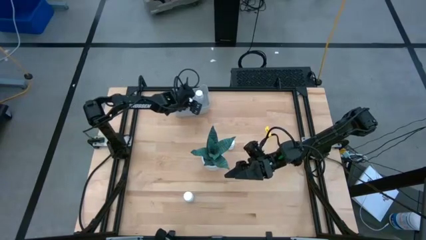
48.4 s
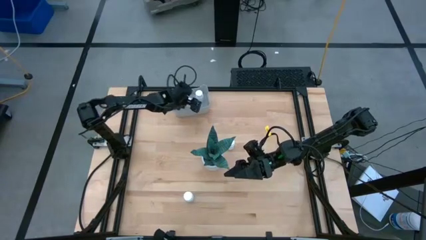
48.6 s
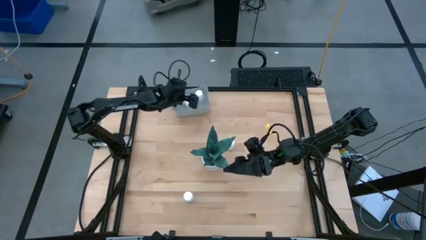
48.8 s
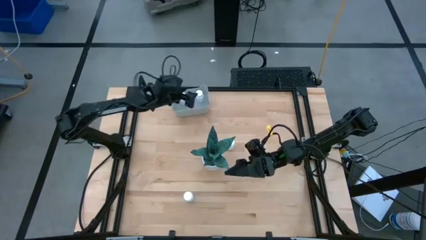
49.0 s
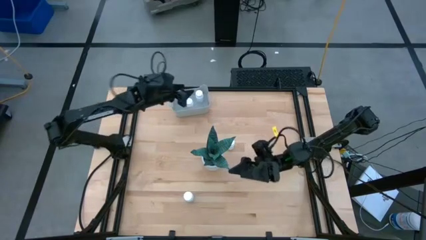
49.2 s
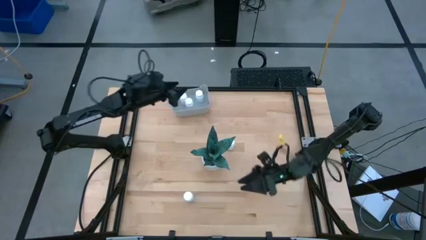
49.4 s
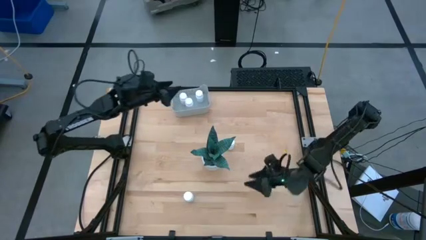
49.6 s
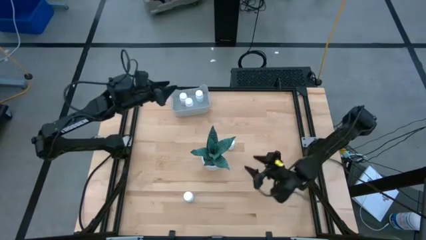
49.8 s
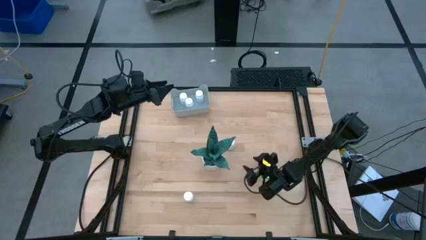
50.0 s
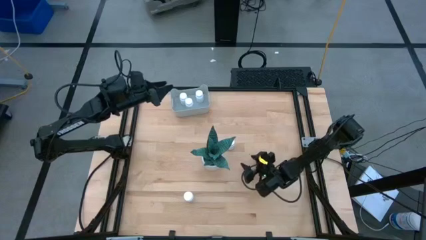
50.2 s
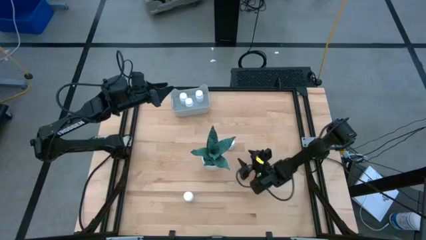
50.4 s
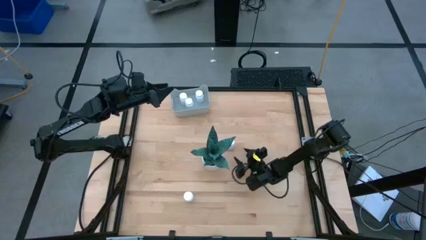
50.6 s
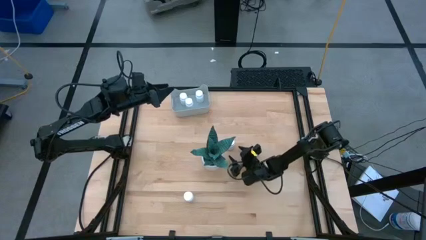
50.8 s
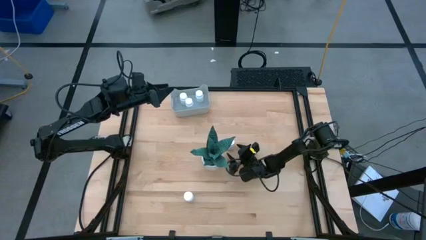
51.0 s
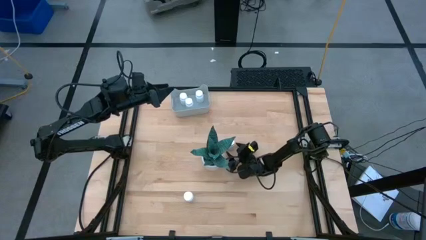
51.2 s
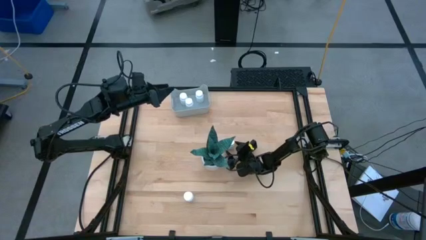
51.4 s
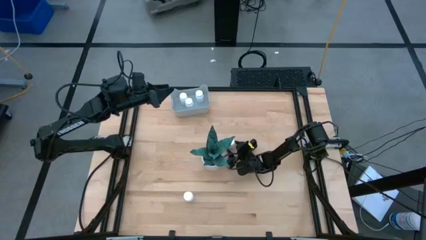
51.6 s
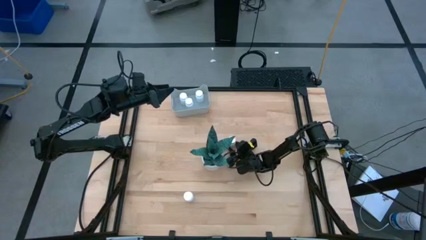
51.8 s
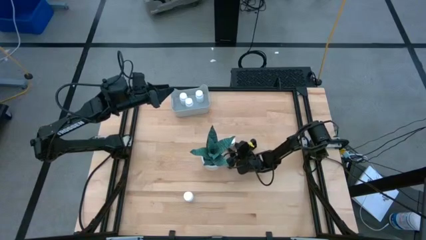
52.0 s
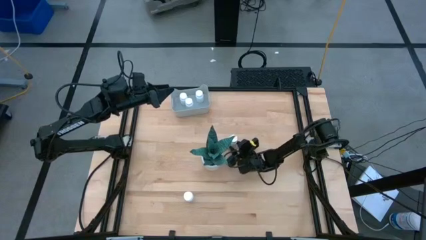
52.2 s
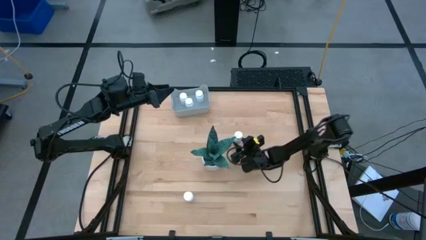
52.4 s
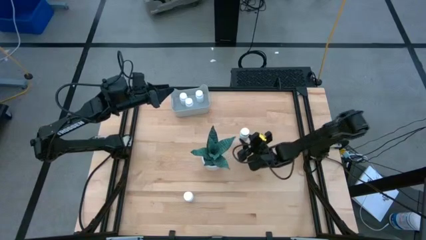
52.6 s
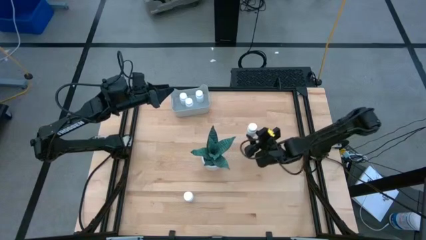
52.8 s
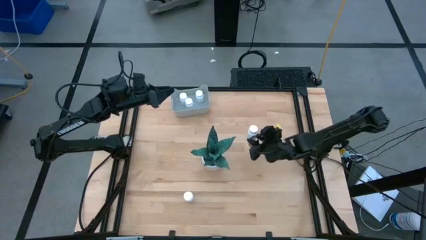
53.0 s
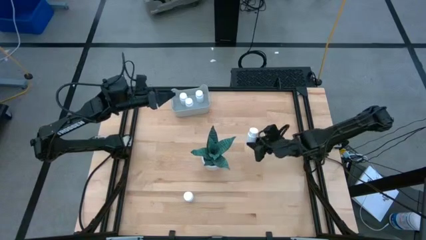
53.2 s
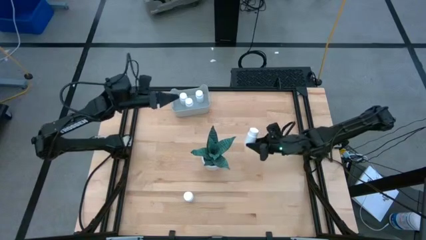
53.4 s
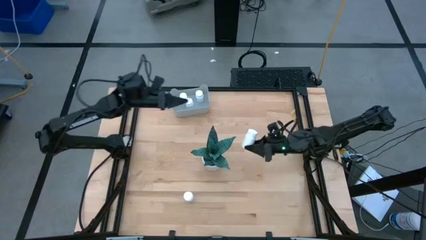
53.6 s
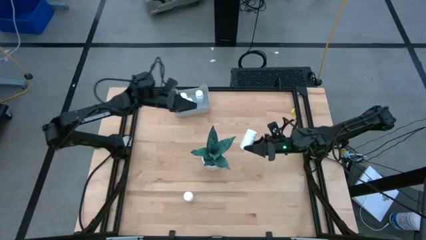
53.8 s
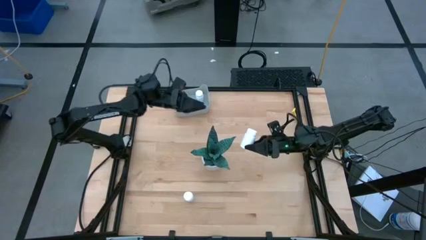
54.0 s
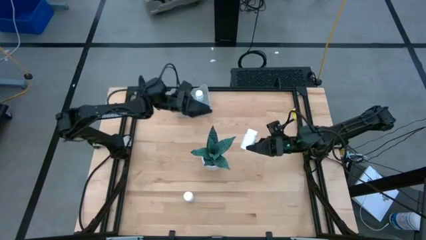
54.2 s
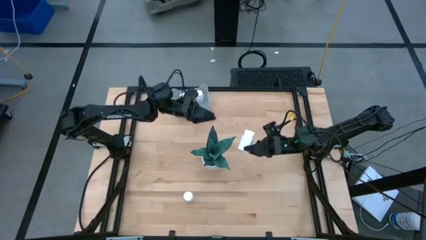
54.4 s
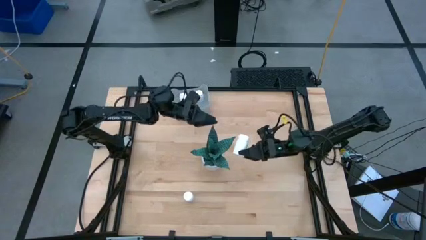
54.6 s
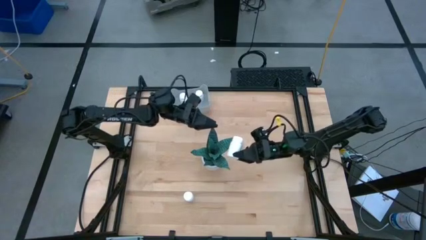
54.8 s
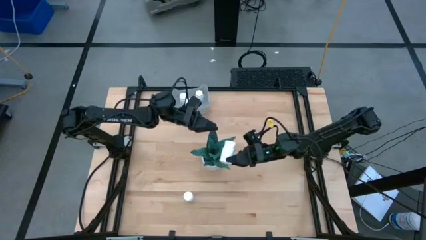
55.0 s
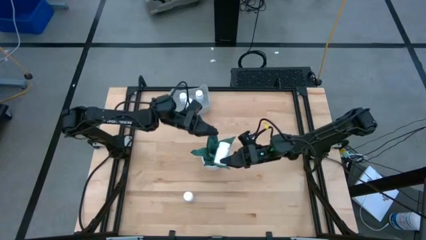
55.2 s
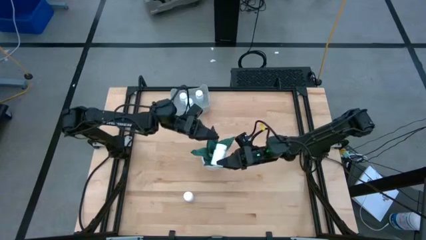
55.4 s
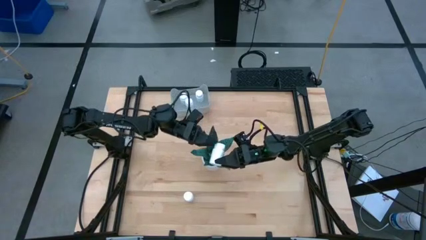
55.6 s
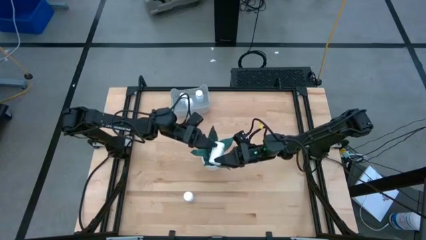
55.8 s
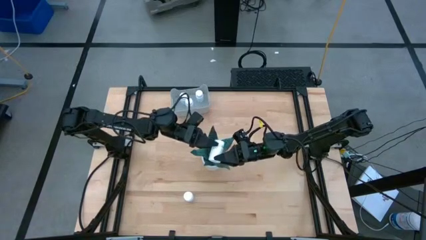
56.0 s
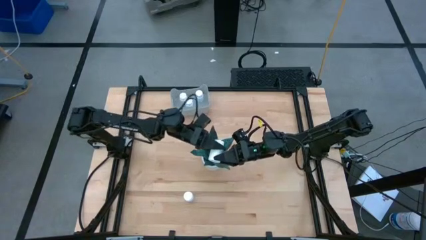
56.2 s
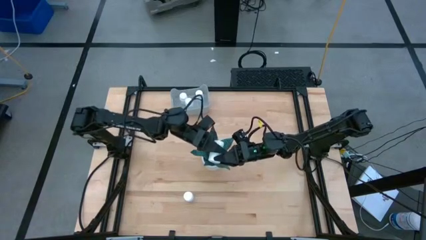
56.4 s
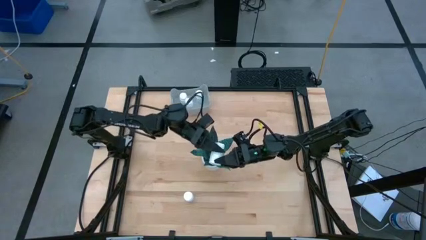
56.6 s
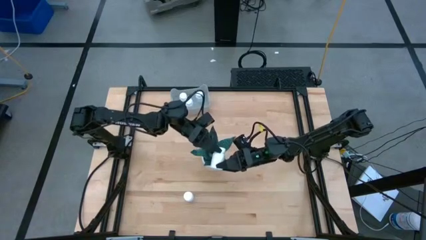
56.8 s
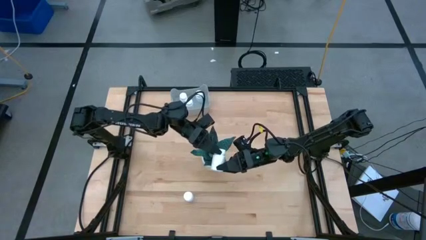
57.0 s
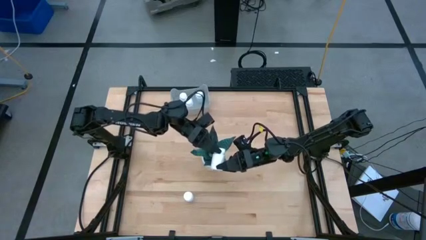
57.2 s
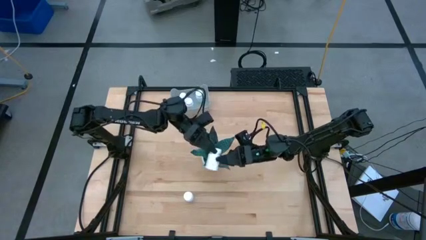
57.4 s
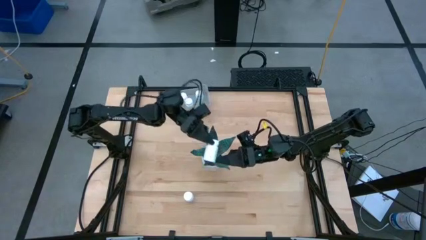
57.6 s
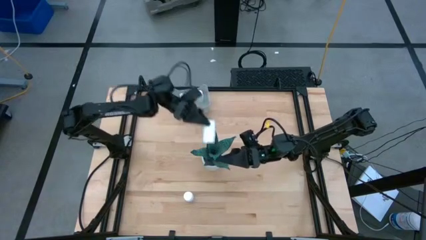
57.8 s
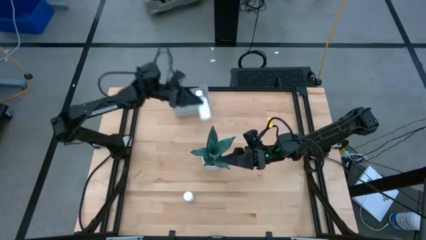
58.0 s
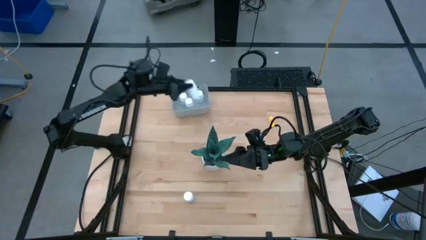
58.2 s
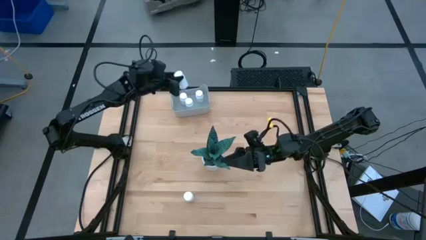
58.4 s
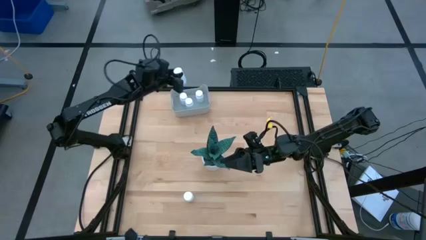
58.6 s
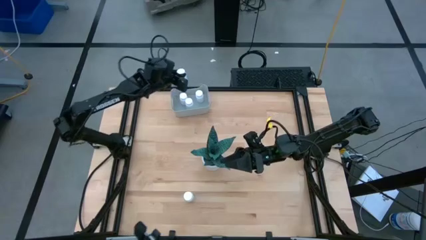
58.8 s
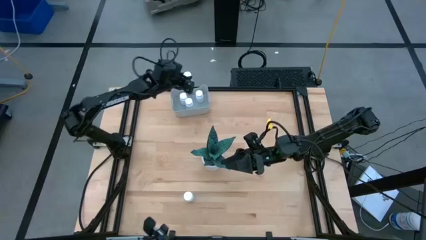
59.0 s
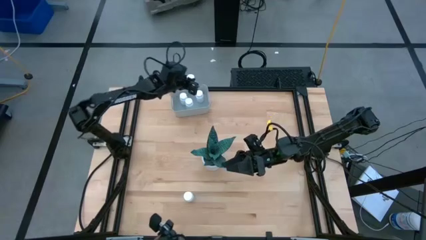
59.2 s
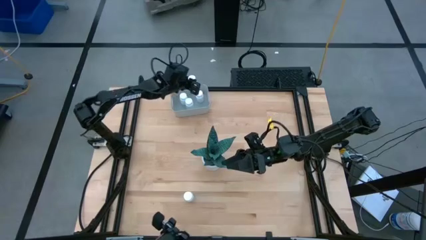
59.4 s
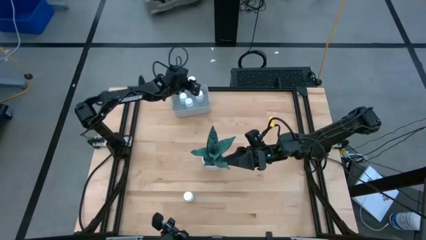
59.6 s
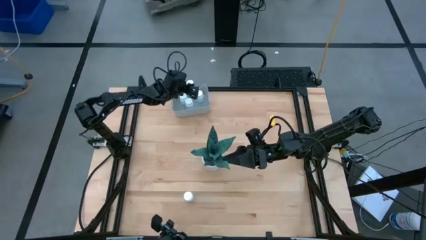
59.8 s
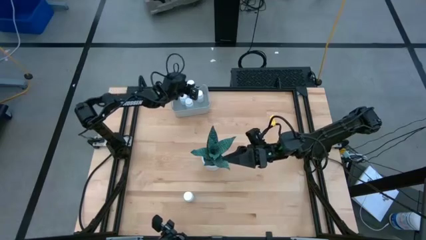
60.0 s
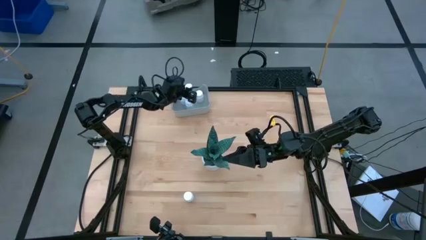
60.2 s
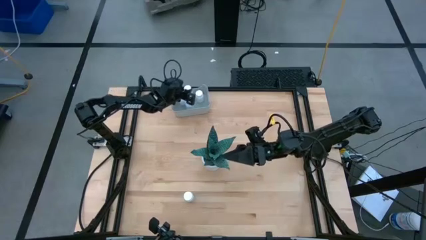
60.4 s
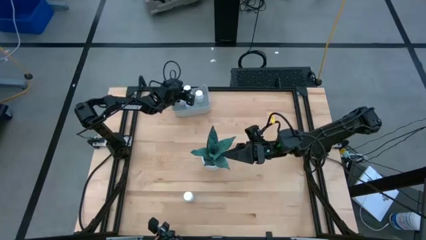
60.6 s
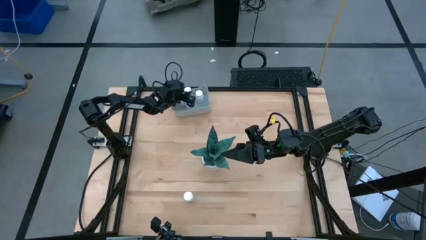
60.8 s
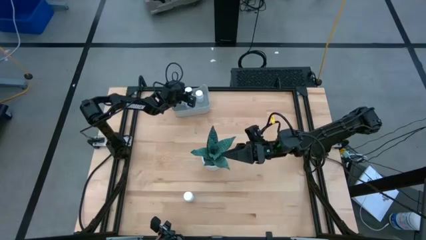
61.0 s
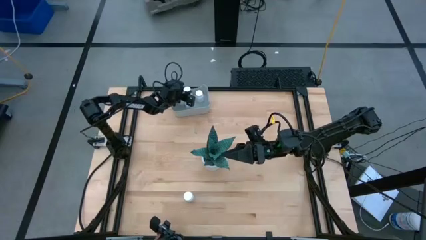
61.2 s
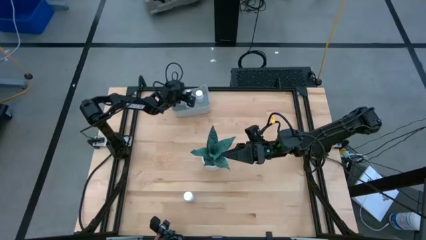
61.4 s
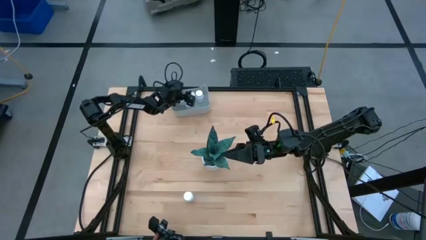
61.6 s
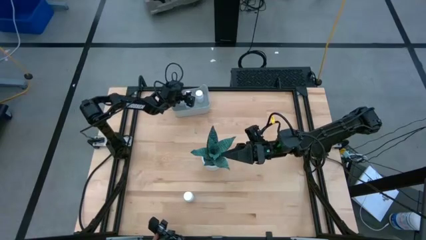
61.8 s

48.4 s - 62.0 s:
Task: Pick and place pill bottles into a basket
Put the white medicine bottle into the gray bin

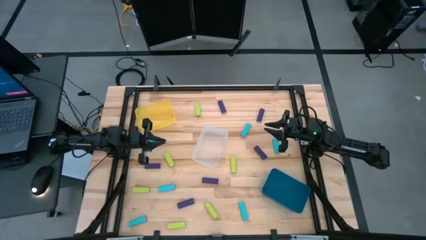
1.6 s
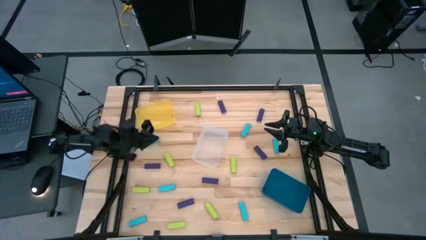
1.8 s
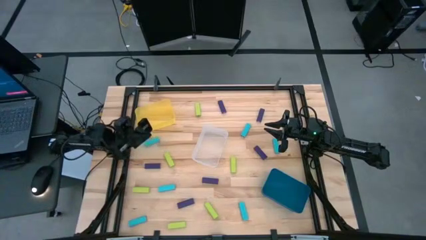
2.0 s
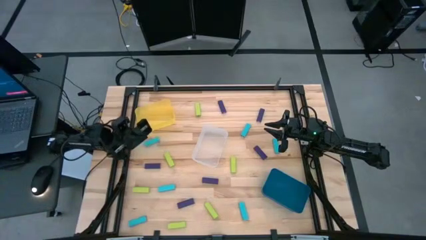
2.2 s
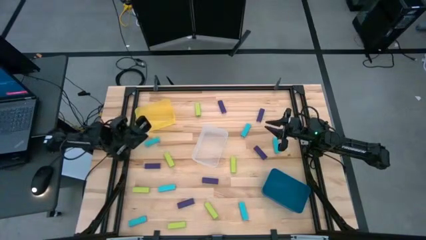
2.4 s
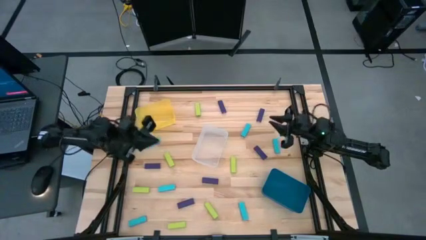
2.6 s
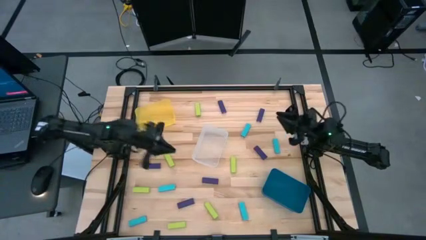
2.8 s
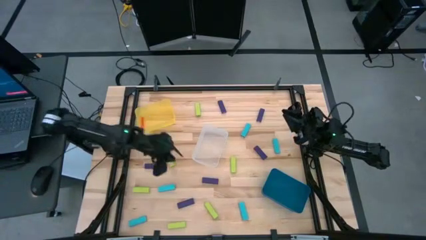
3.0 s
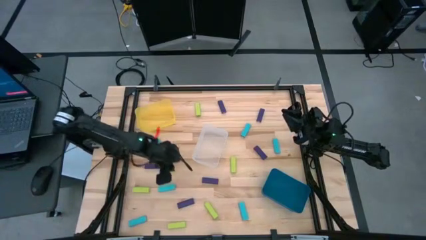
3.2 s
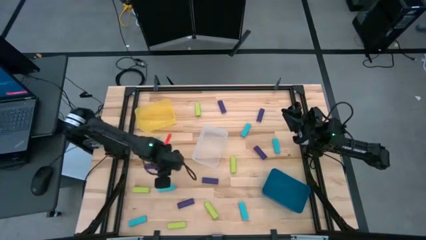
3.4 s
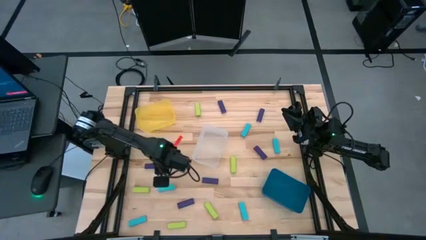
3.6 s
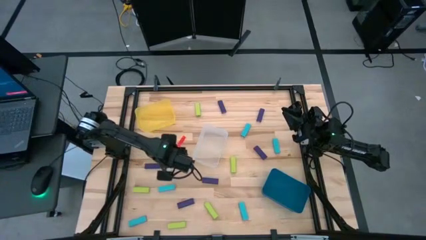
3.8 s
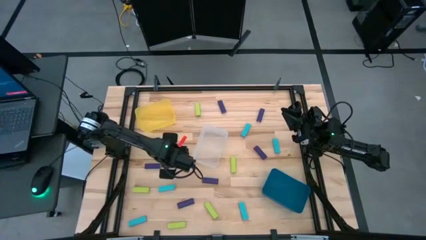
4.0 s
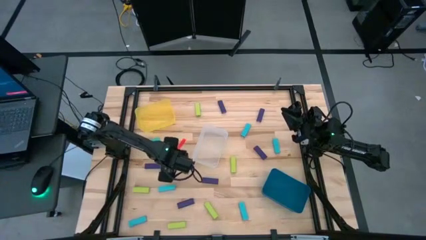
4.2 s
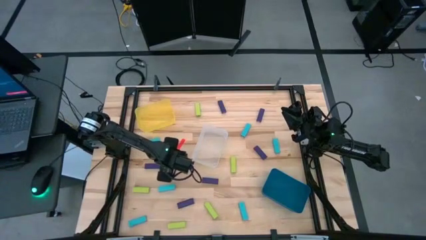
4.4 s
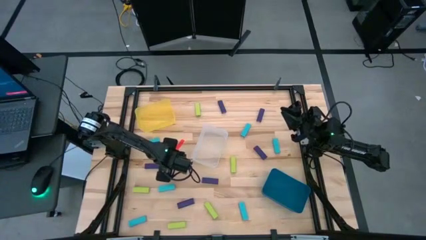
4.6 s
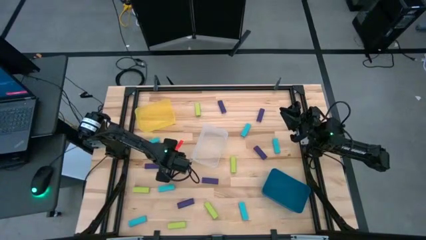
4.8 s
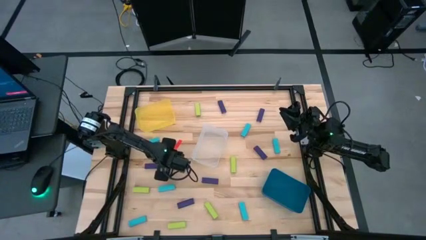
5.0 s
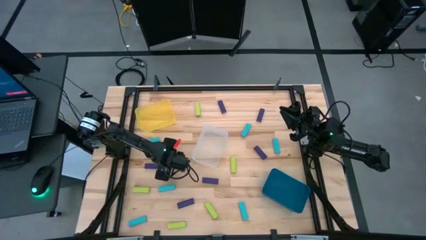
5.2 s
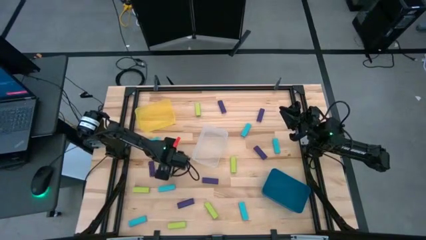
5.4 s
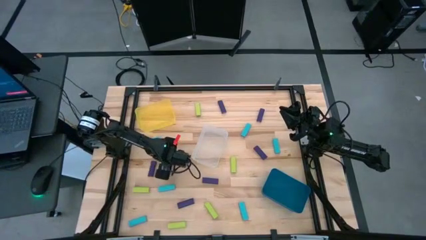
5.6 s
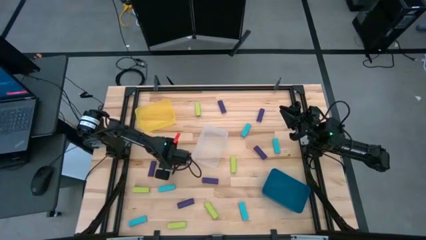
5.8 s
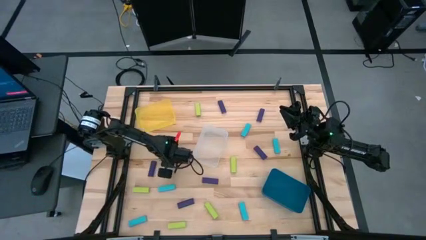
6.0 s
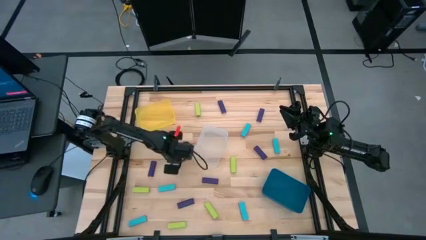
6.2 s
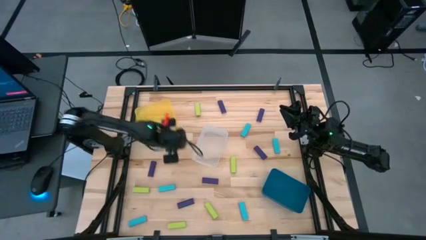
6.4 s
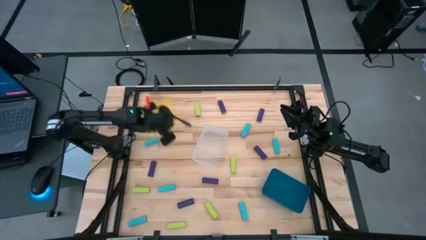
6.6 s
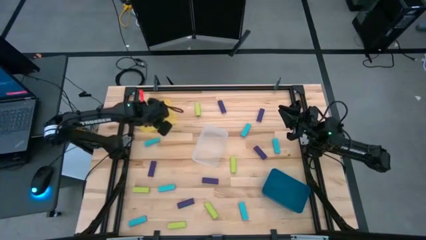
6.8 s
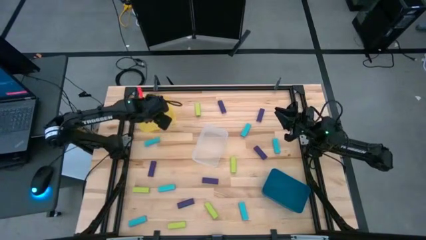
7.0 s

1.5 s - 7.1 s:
Task: Sort blocks
Put the green block into the yellow bin
